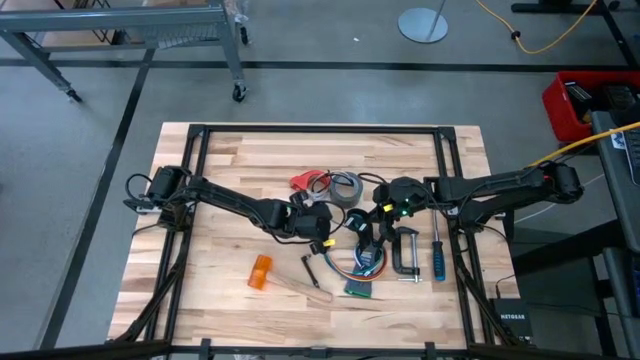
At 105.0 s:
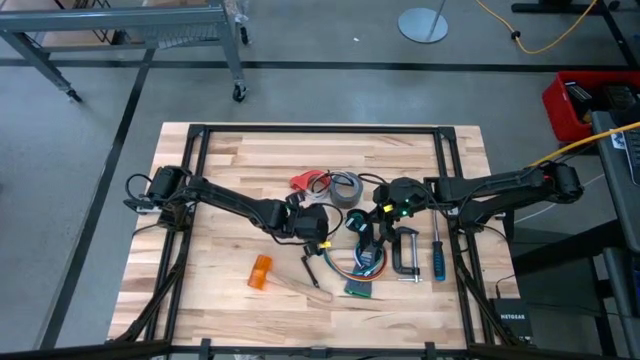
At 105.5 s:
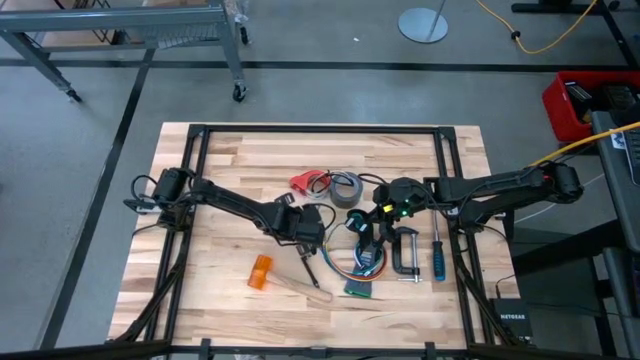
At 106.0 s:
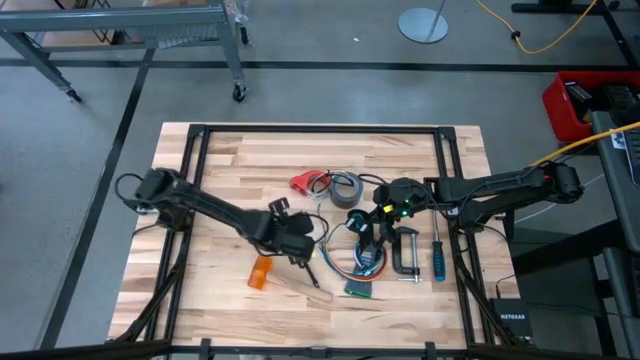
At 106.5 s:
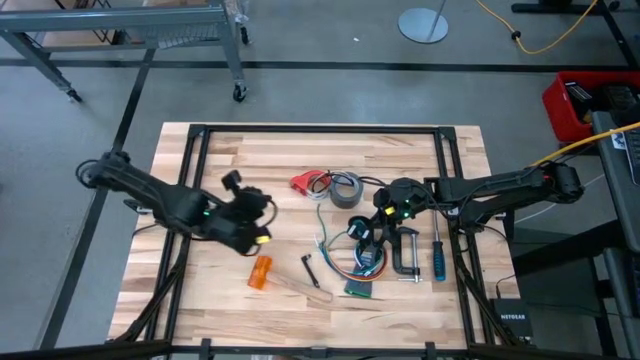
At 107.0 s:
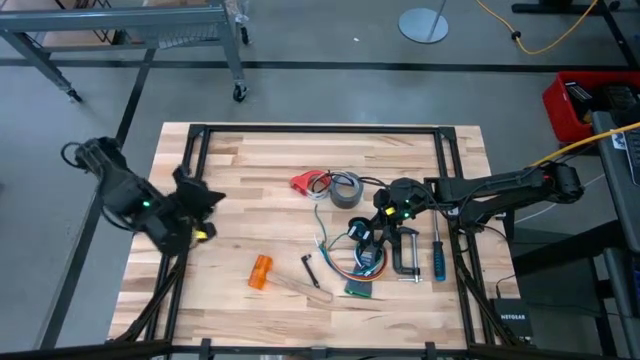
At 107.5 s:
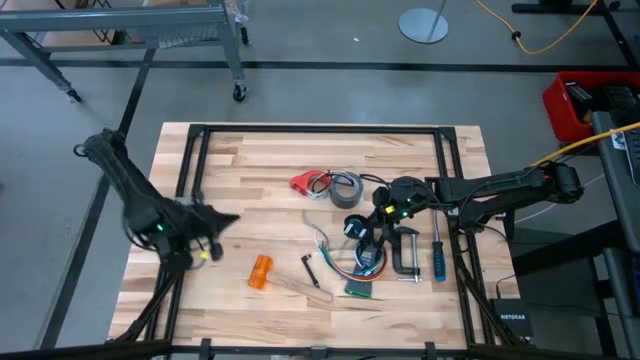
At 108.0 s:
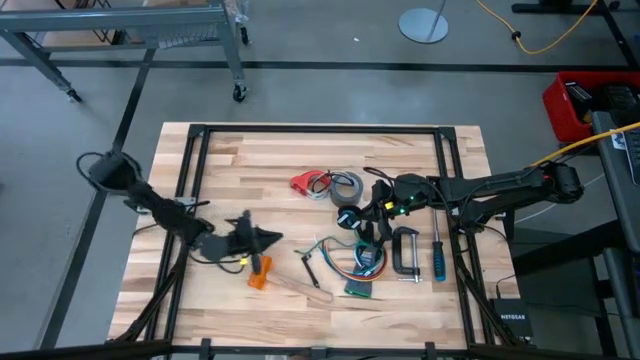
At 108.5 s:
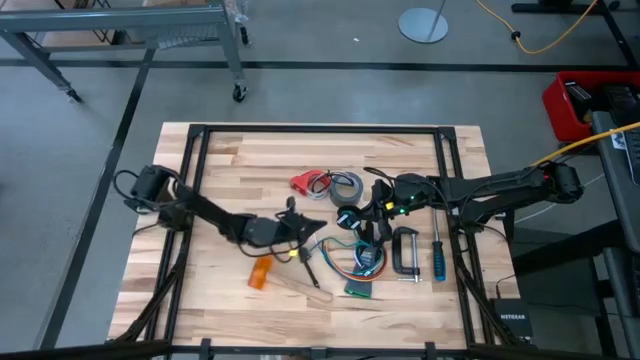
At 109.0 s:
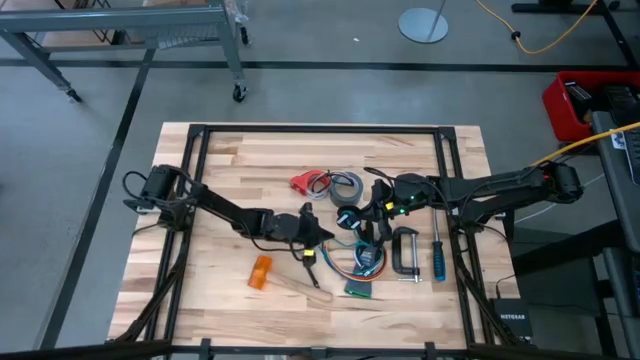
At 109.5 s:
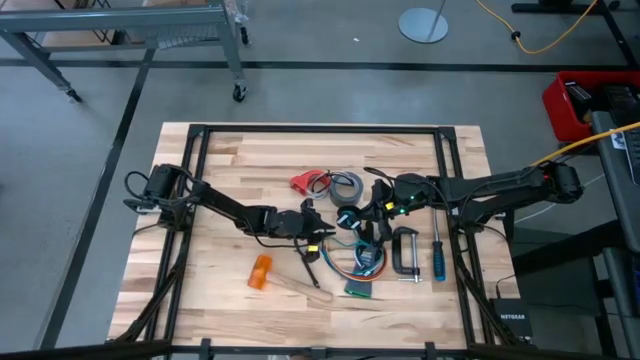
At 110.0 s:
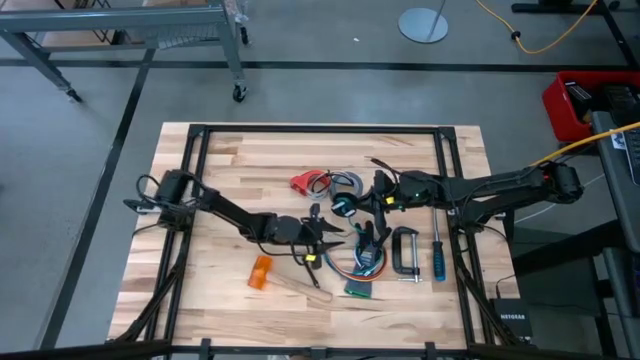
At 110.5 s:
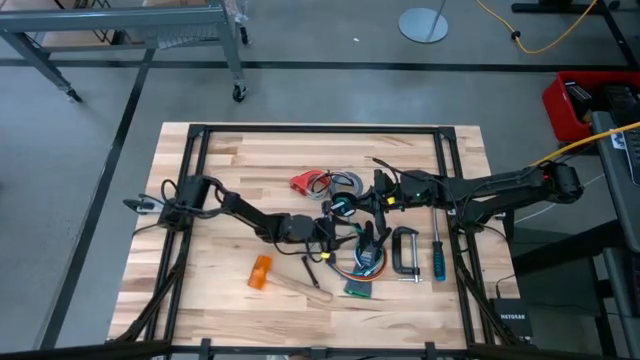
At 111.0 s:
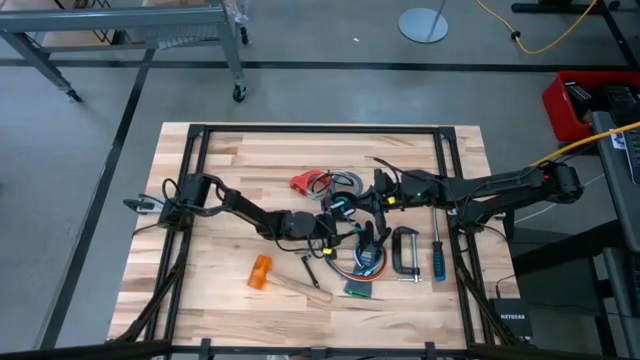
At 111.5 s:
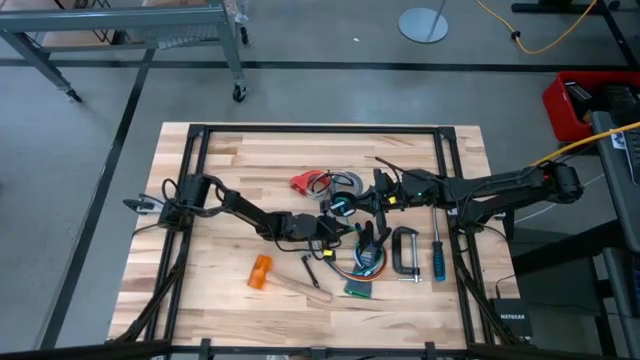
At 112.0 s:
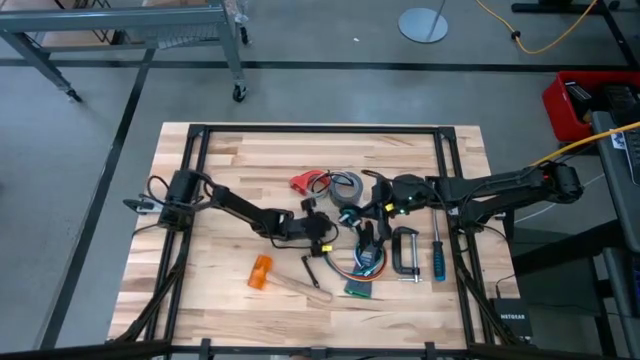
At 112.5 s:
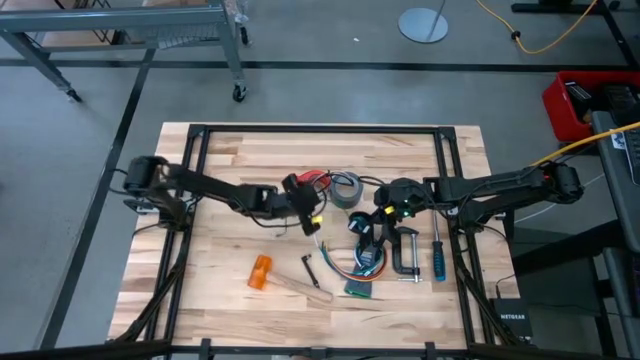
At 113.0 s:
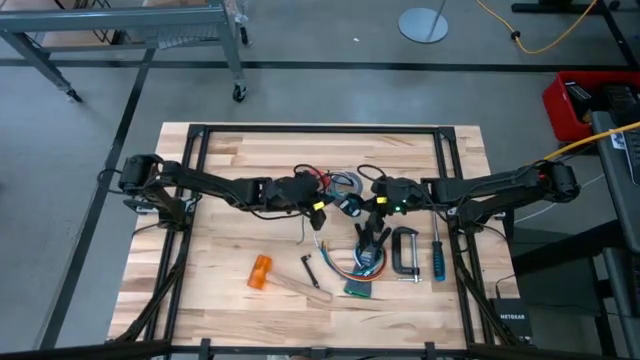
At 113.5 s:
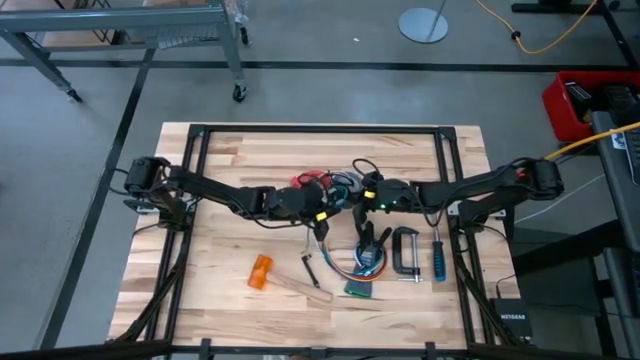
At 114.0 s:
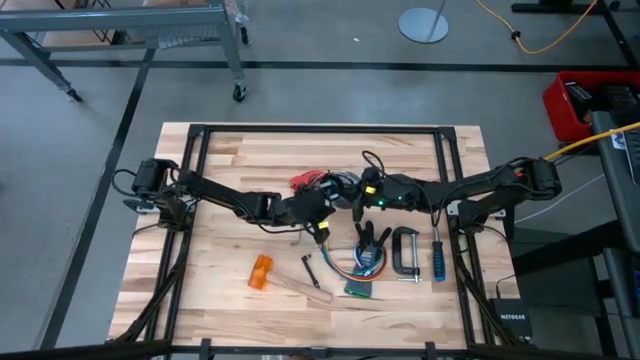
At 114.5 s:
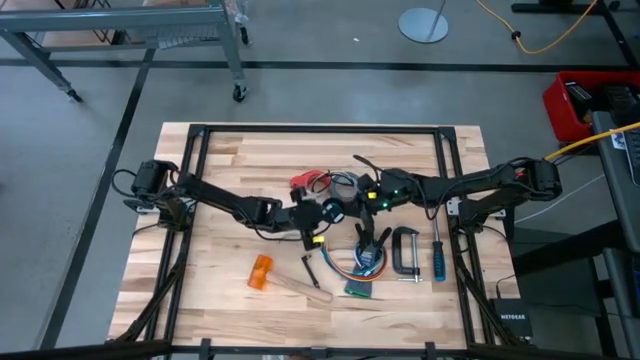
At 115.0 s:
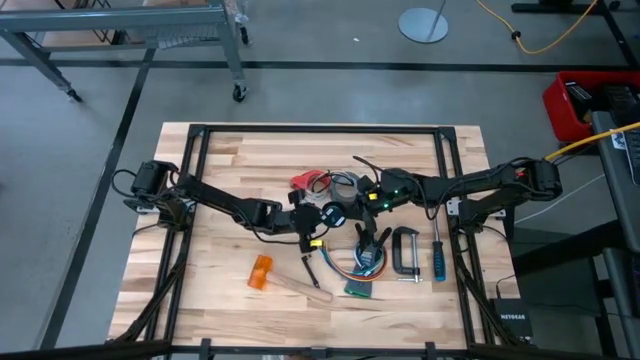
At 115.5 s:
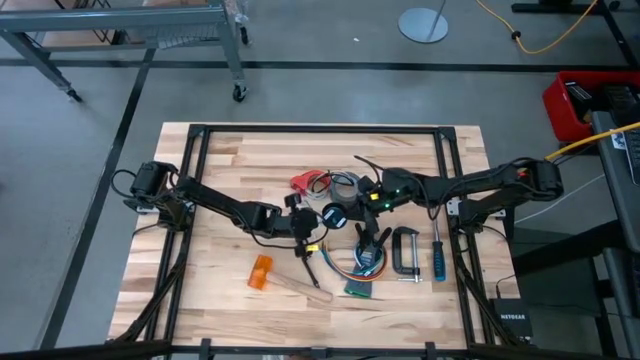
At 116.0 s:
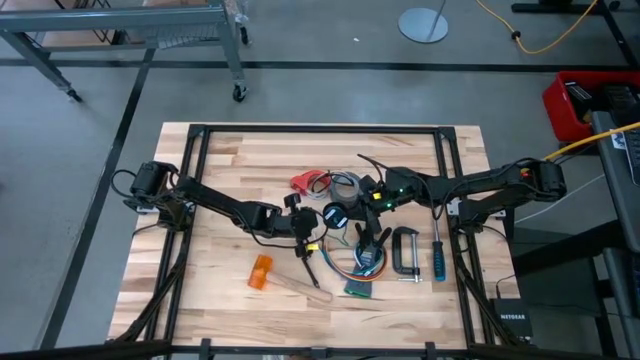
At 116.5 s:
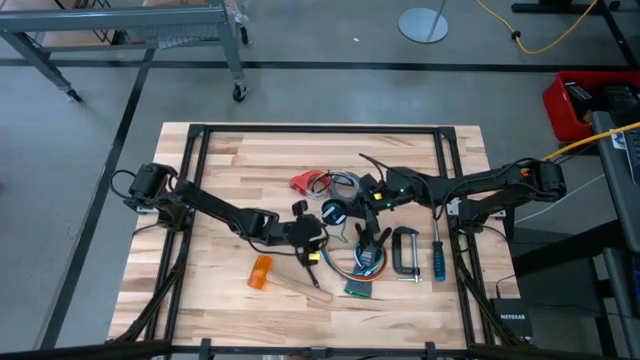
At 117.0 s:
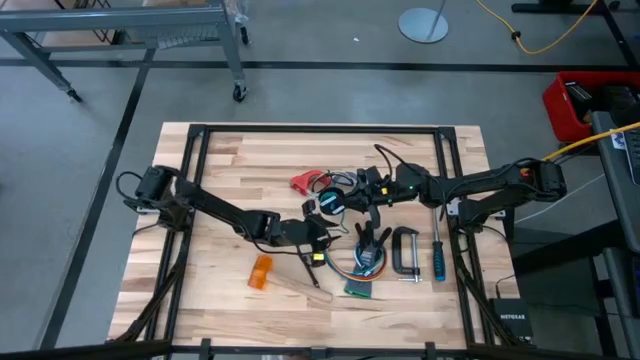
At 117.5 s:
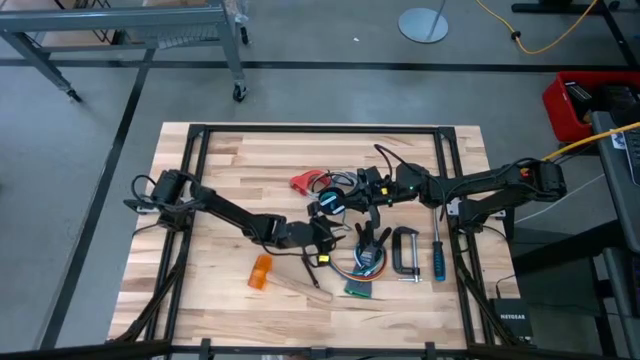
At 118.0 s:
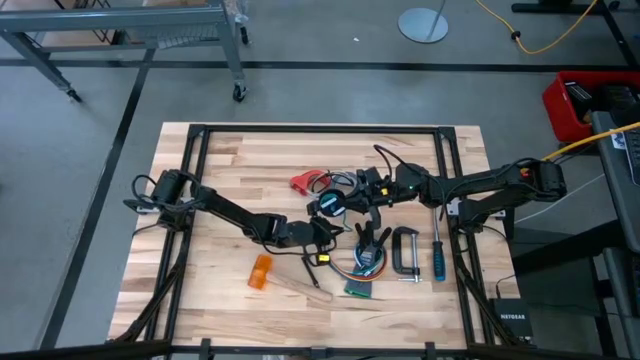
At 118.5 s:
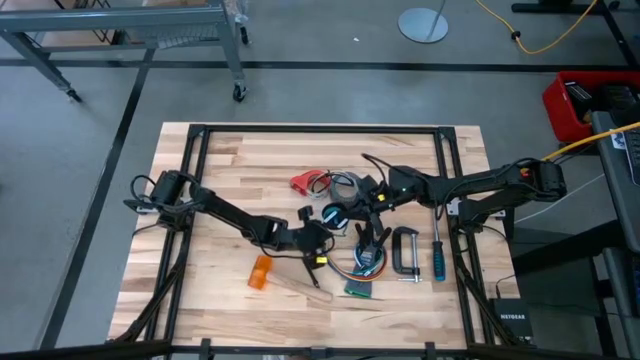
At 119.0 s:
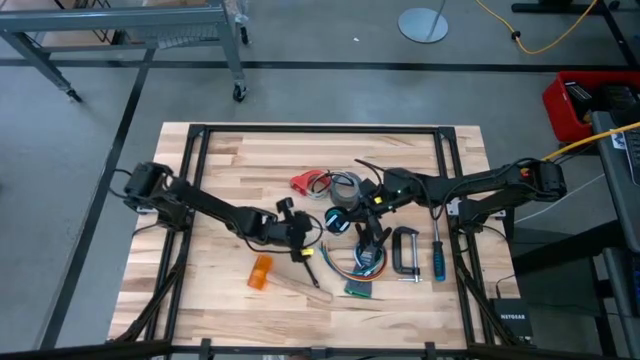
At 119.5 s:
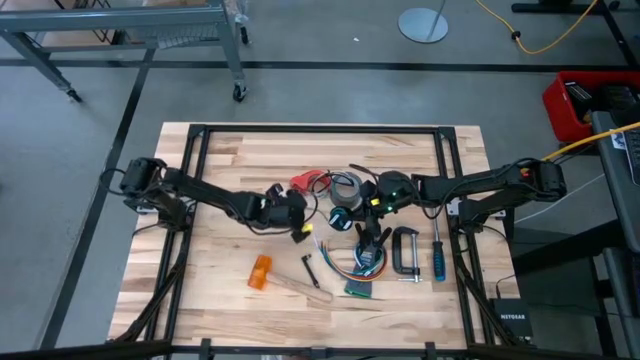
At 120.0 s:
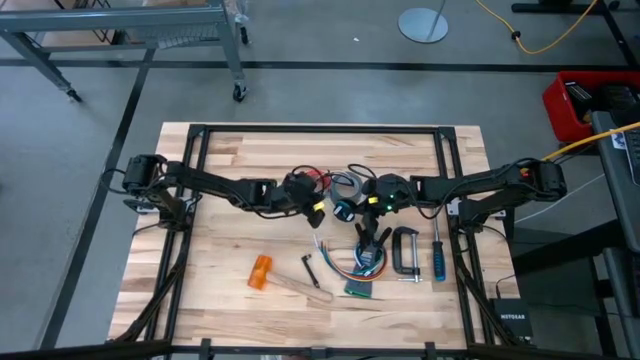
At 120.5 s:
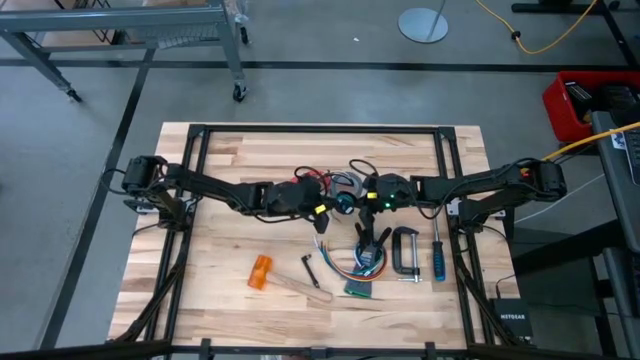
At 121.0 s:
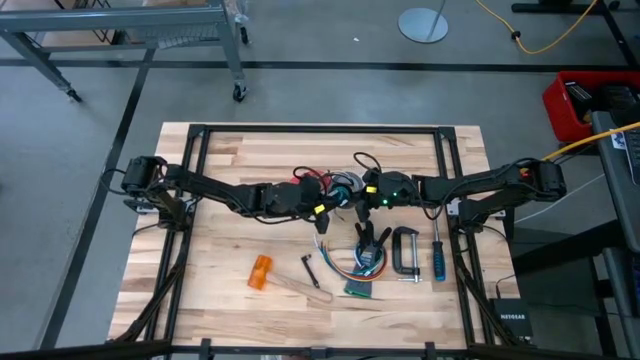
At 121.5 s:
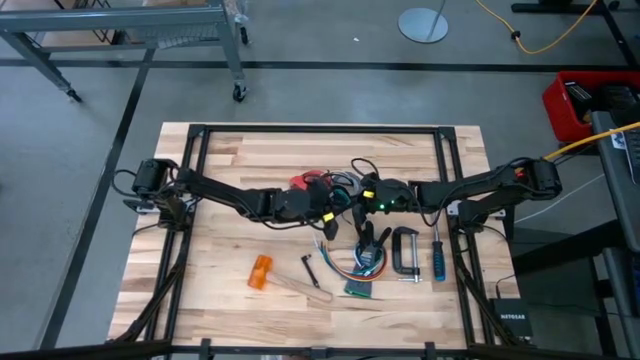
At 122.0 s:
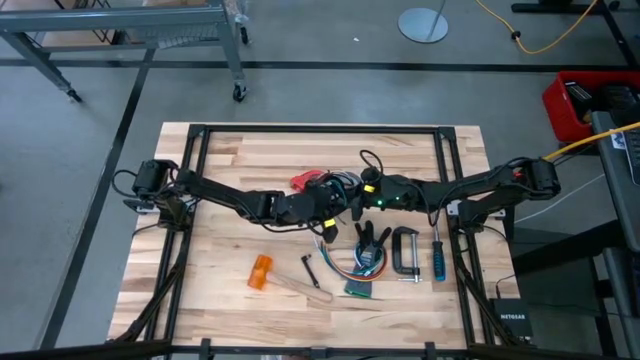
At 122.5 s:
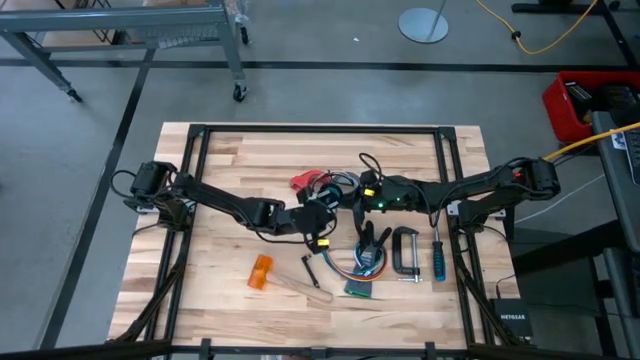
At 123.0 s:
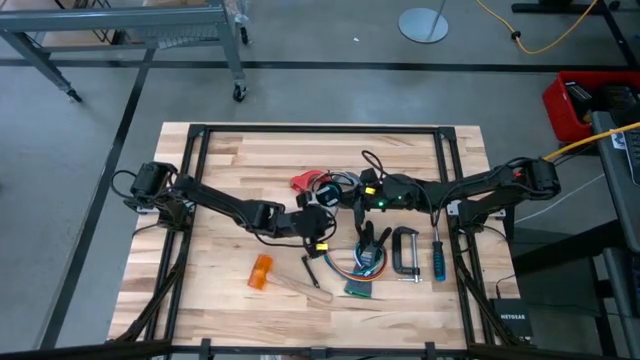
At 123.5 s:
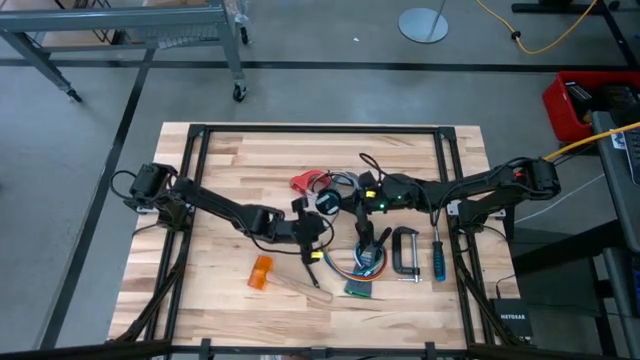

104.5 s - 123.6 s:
Task: Coil cords
Coil the blue wire onto the spool

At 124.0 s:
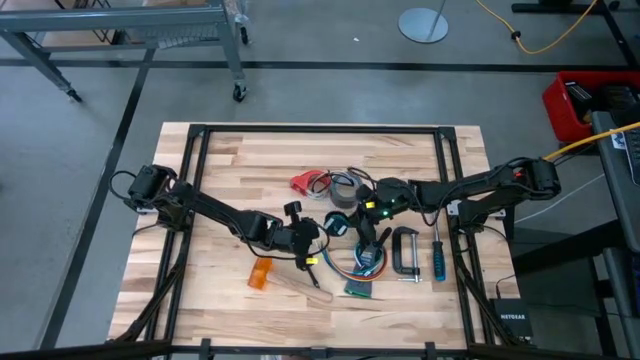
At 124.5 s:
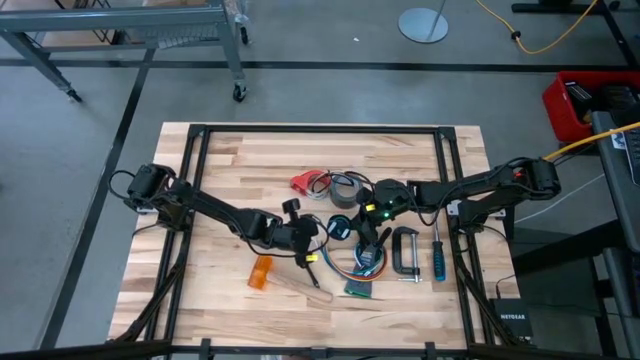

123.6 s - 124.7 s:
Coil the blue wire onto the spool

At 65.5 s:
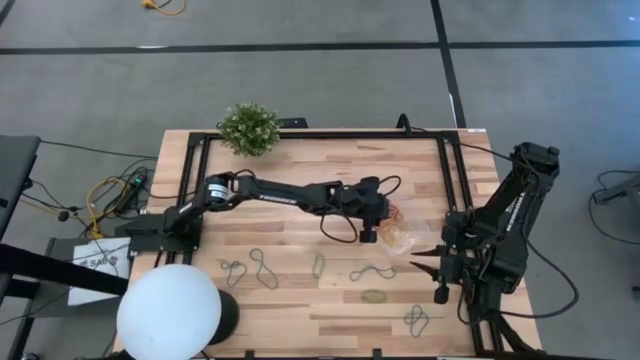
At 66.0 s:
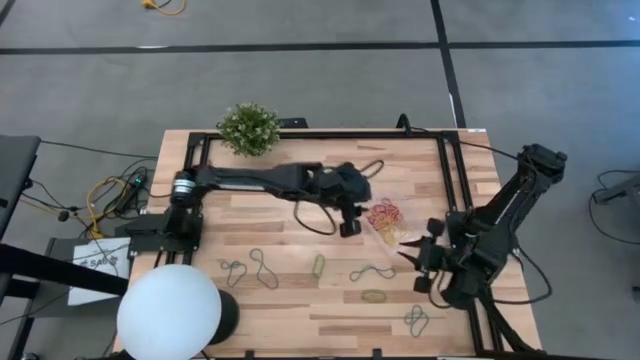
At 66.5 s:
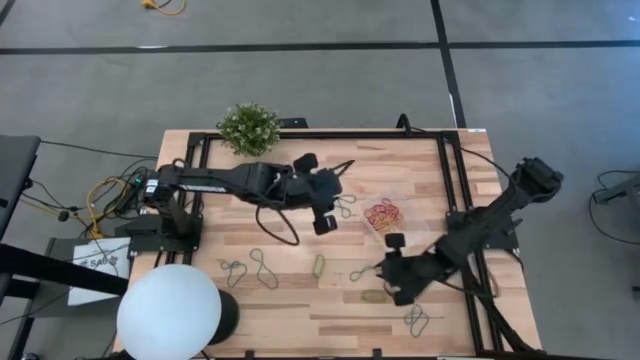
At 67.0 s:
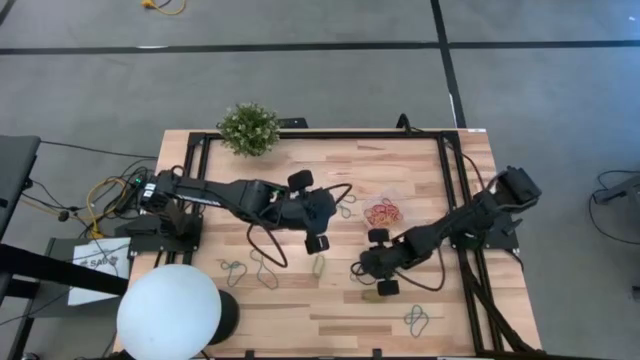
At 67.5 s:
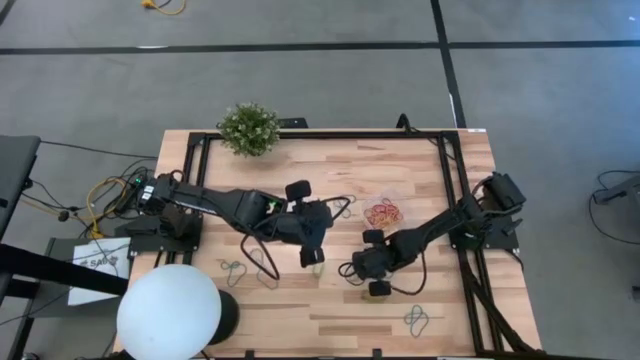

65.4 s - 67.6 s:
Task: Pick and place items into bin
Put the blue rubber band into the transparent bin
